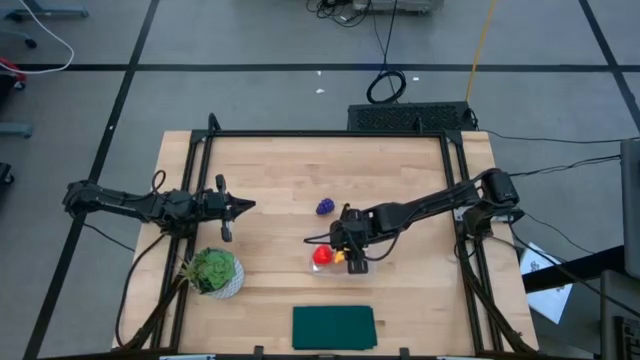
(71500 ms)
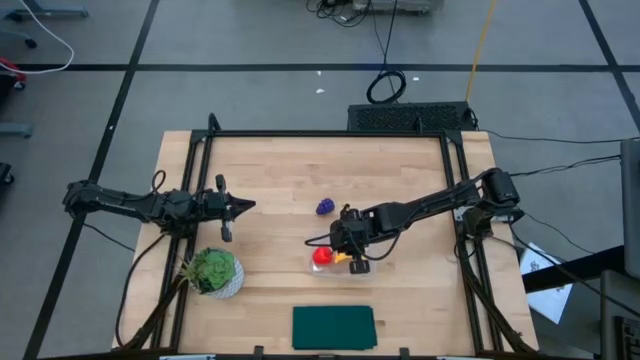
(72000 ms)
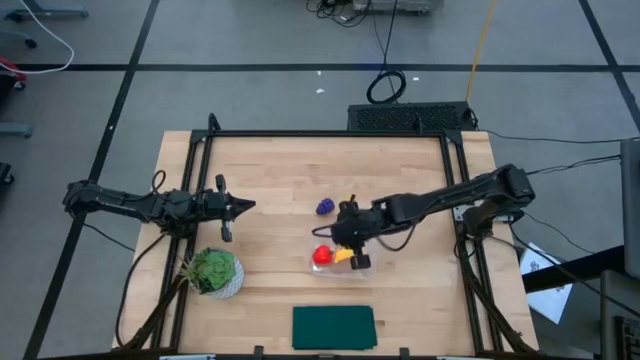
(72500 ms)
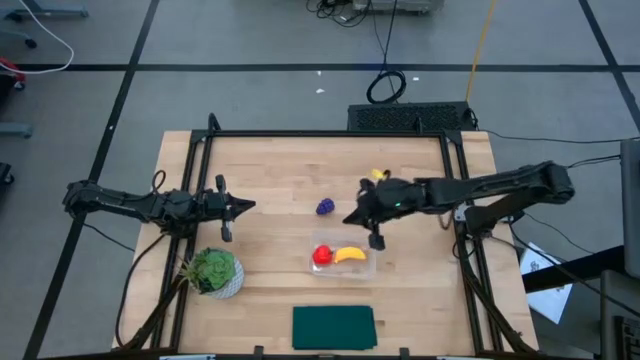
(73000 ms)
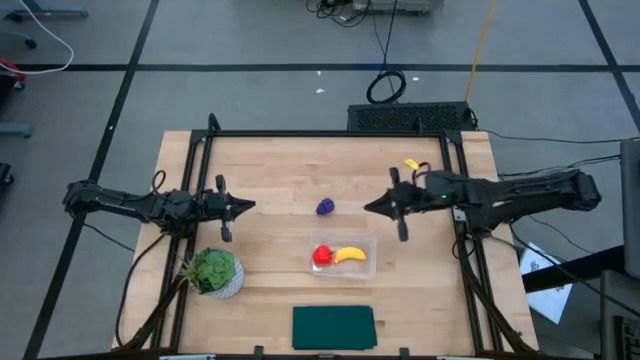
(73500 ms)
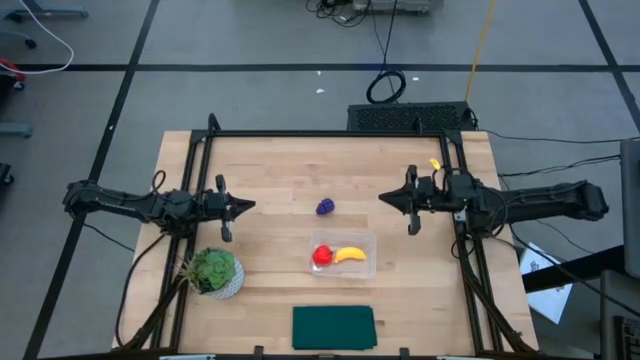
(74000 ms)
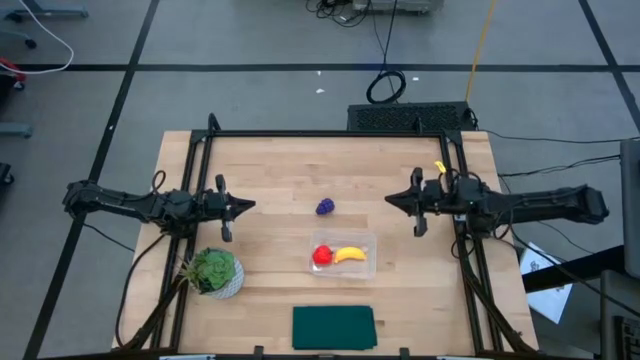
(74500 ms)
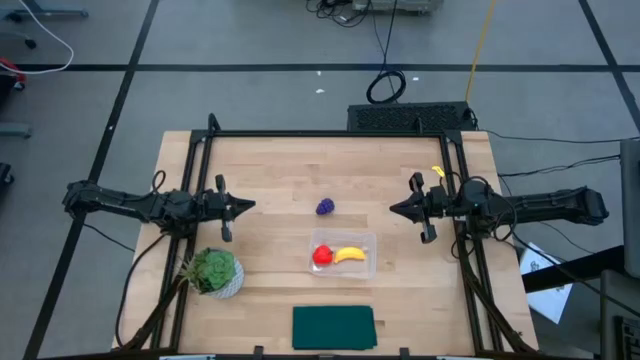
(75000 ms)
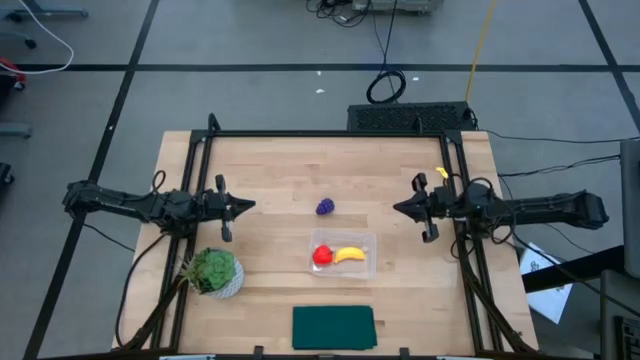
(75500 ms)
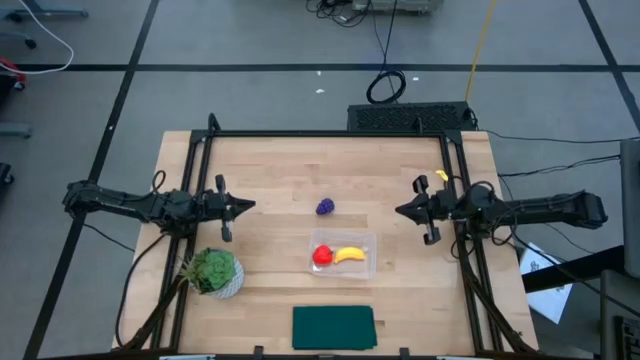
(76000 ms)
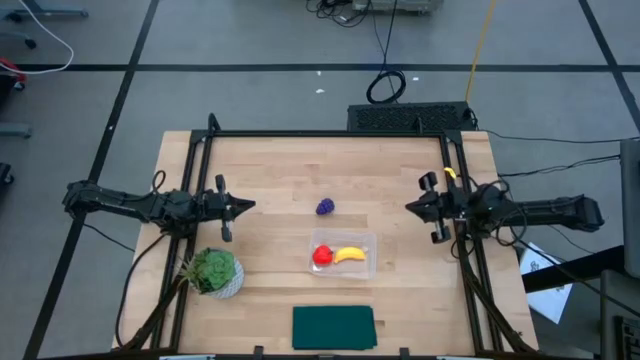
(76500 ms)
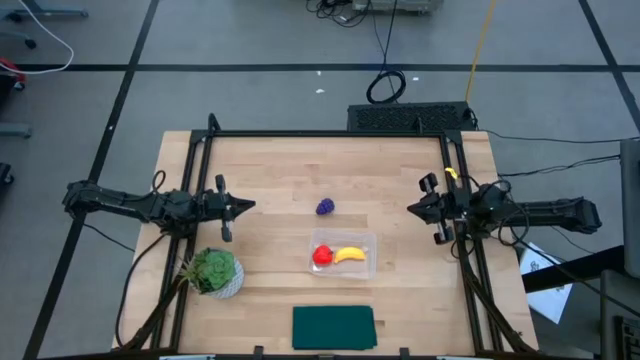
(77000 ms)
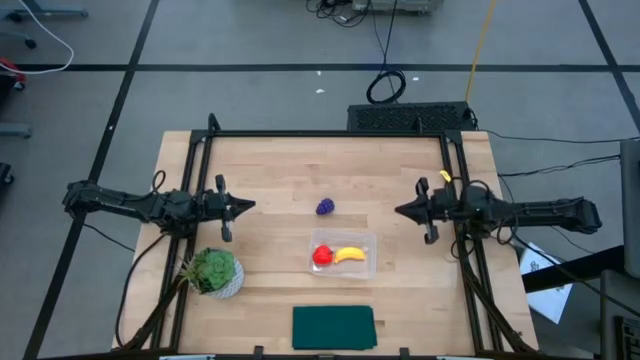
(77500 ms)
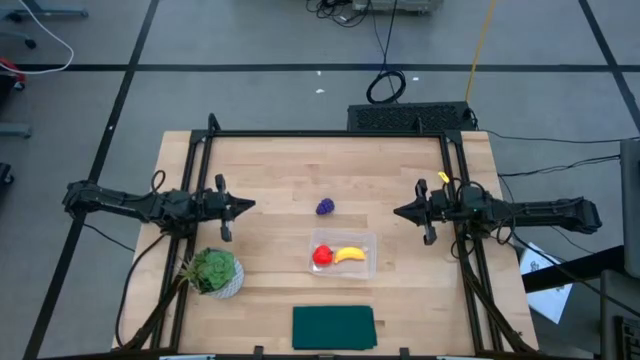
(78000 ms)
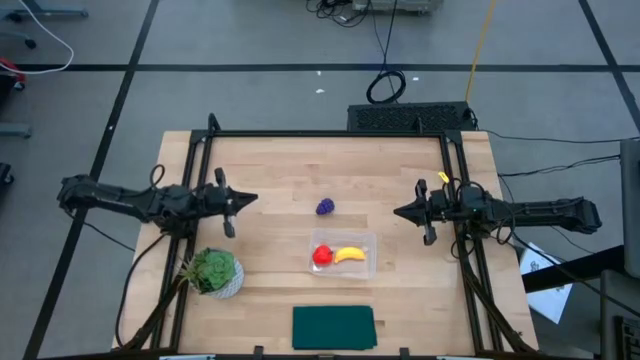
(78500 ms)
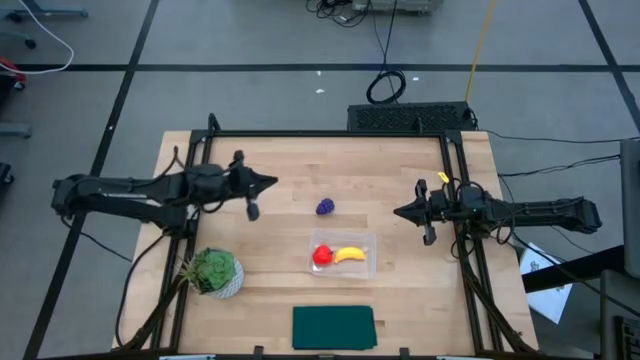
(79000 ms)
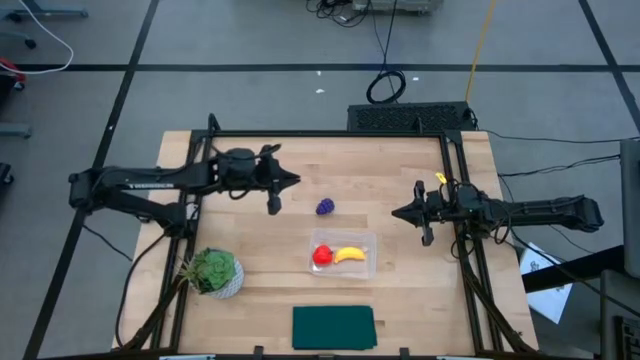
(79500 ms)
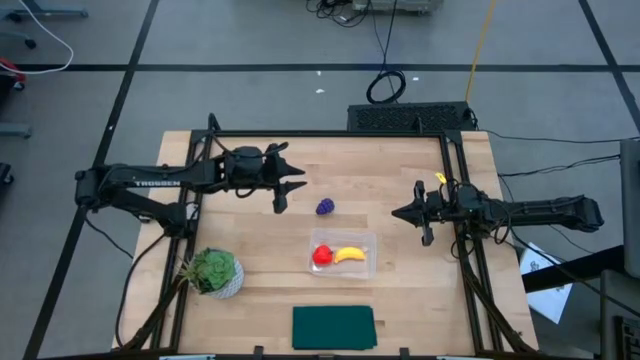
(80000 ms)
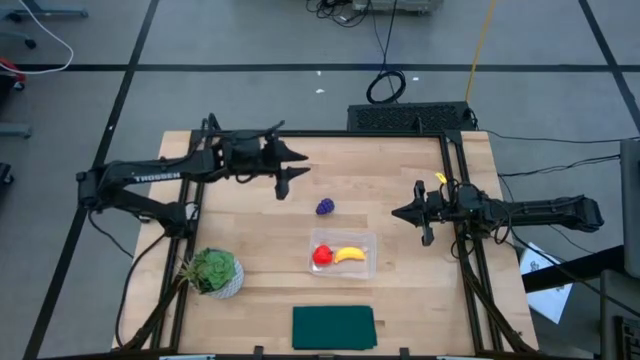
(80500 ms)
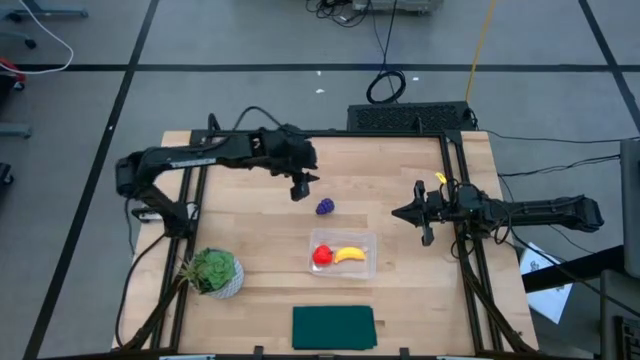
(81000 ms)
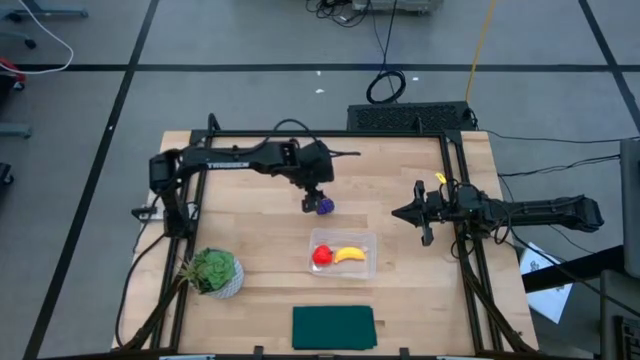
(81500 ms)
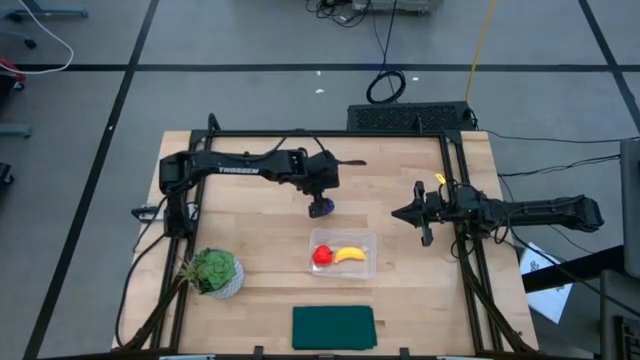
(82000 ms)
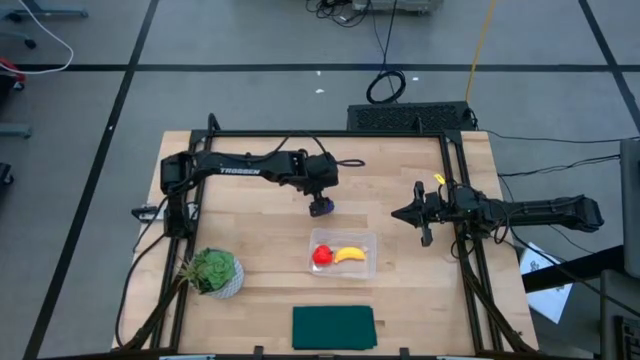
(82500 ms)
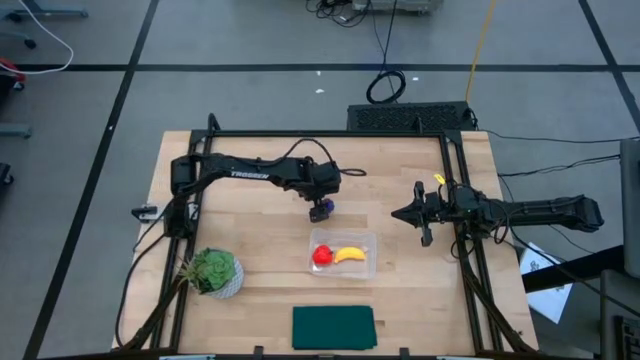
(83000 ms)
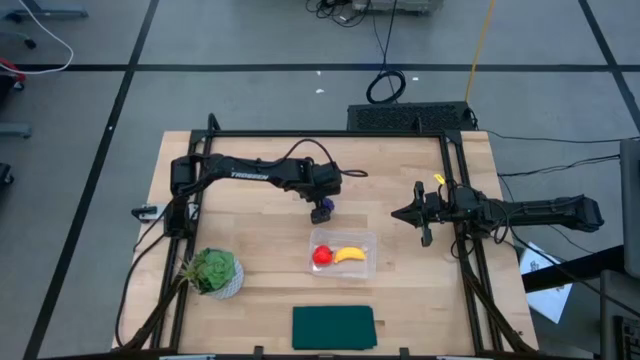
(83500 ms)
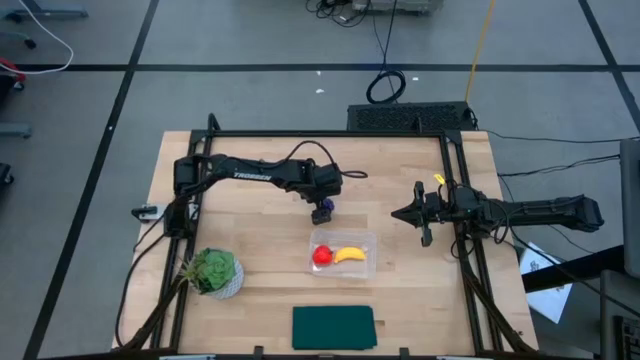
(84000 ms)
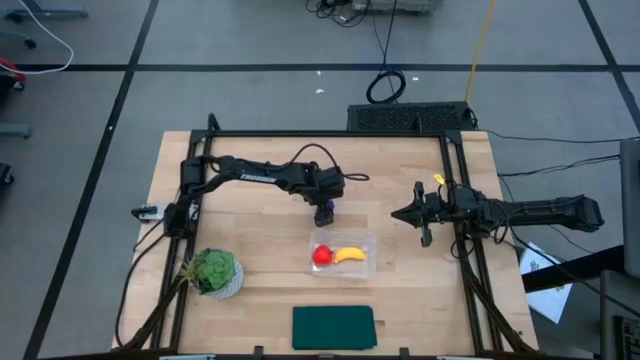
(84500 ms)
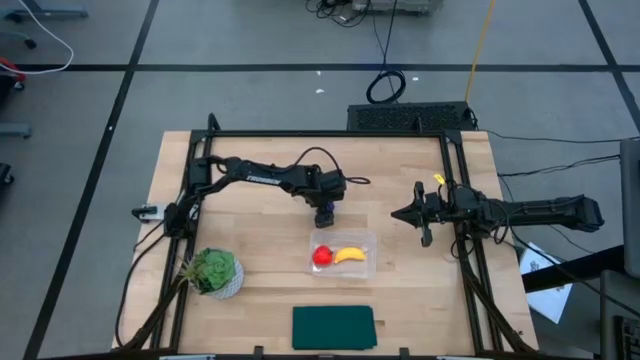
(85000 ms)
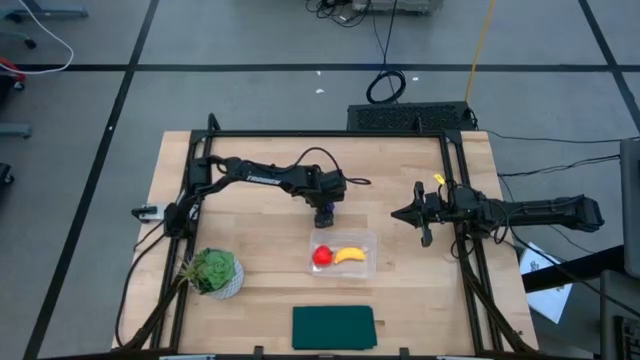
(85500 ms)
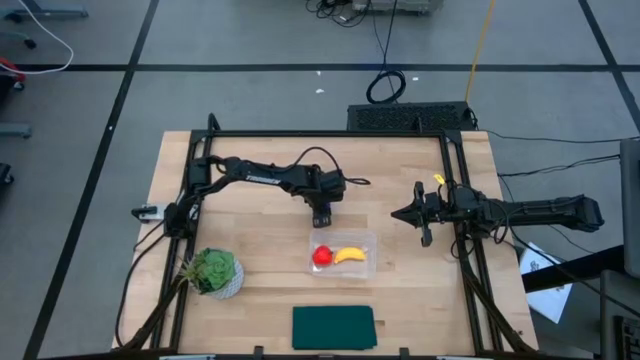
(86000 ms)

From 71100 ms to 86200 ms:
Task: Pick and placing Produce into tupperware
Put the grapes into the transparent bin

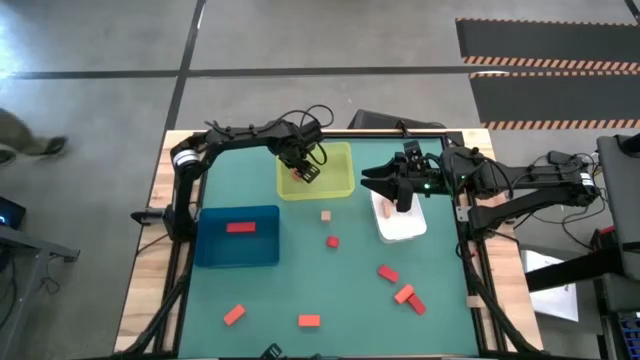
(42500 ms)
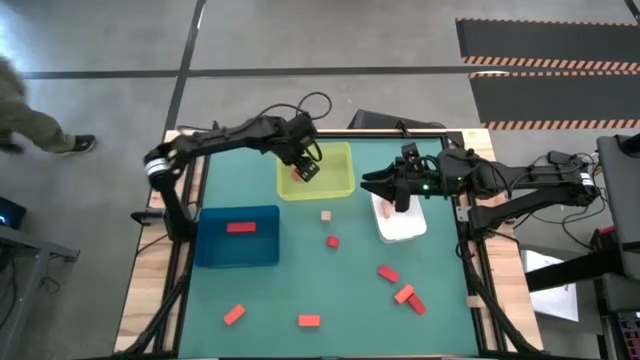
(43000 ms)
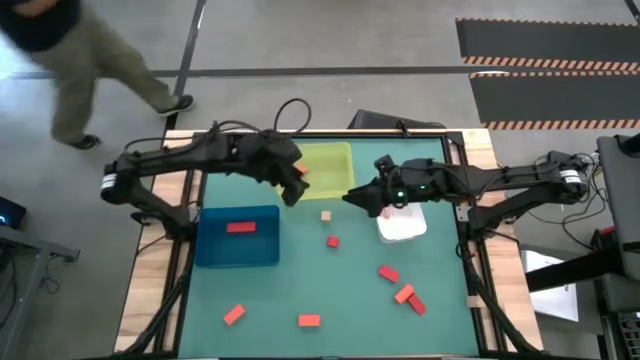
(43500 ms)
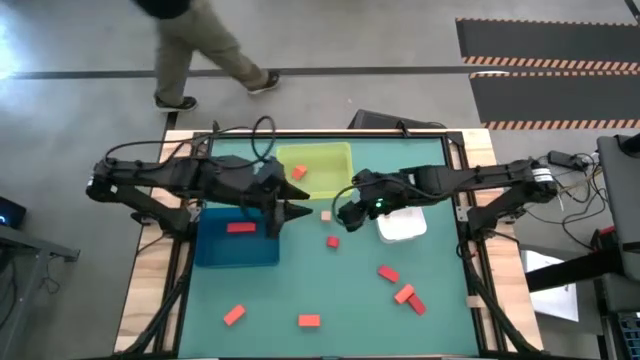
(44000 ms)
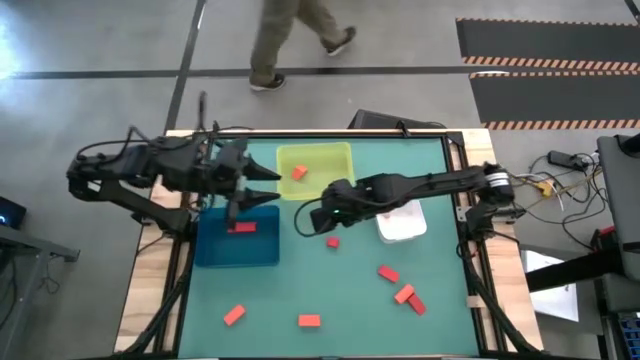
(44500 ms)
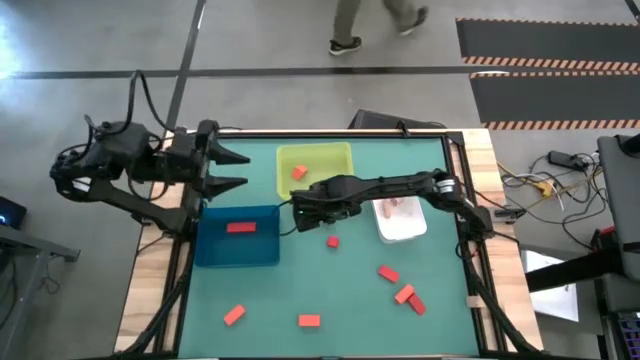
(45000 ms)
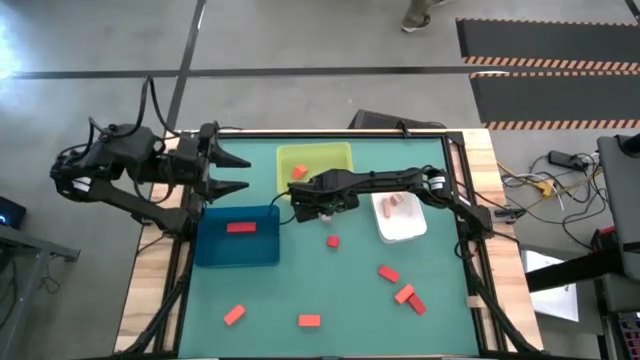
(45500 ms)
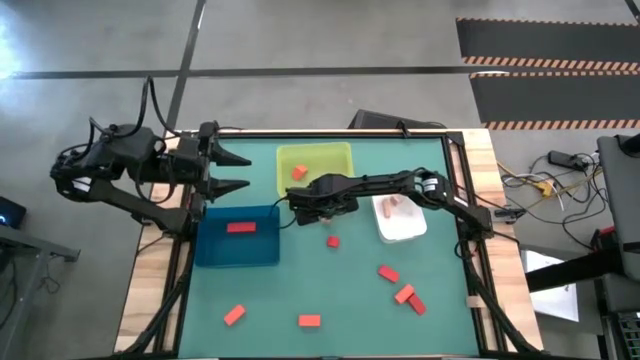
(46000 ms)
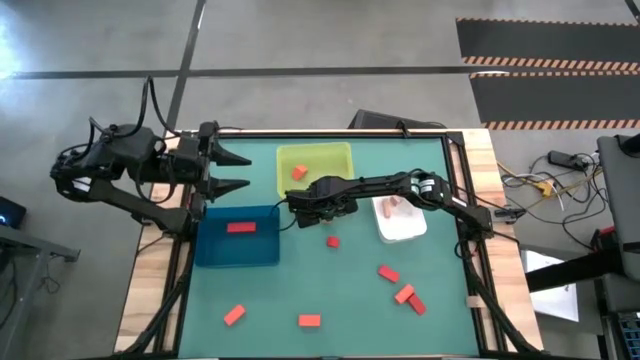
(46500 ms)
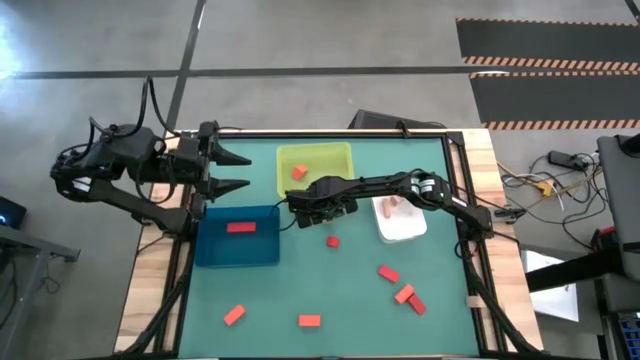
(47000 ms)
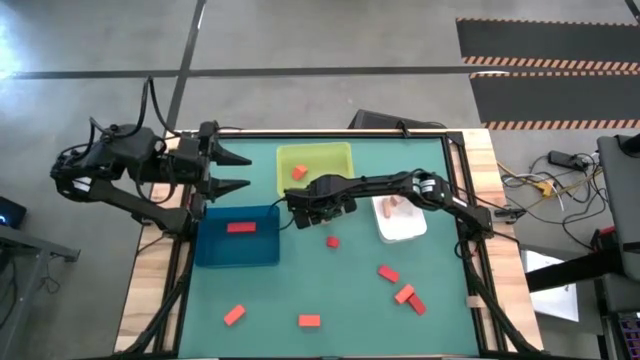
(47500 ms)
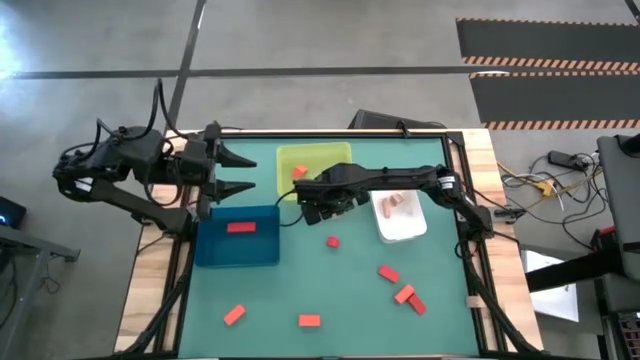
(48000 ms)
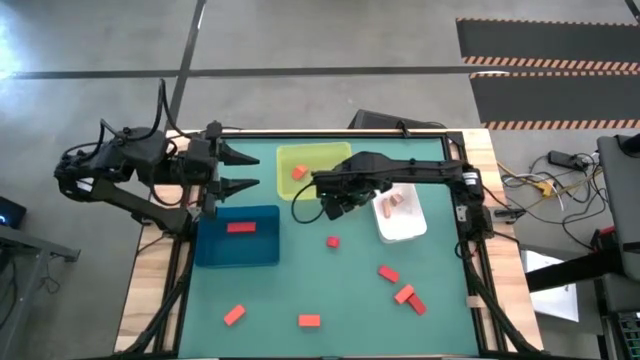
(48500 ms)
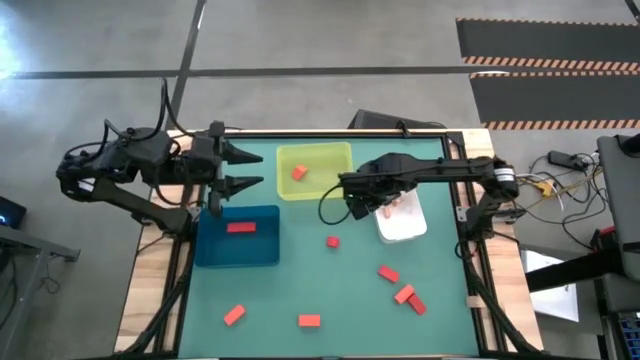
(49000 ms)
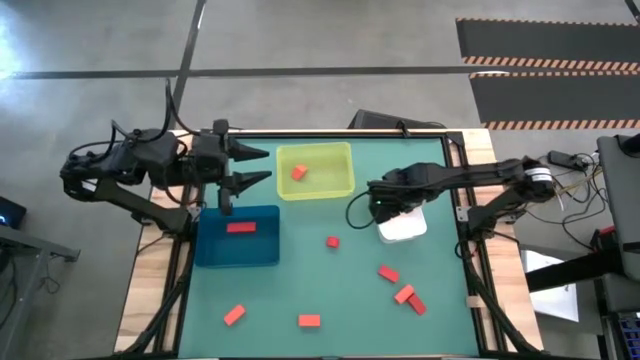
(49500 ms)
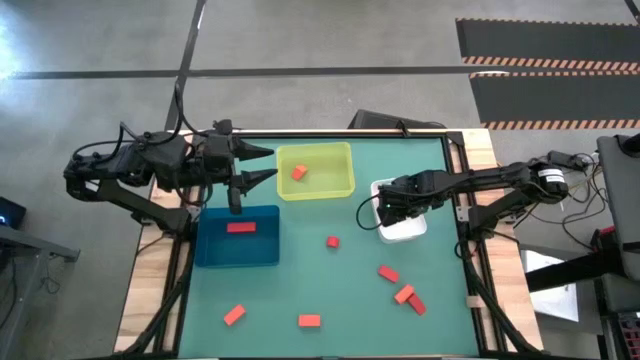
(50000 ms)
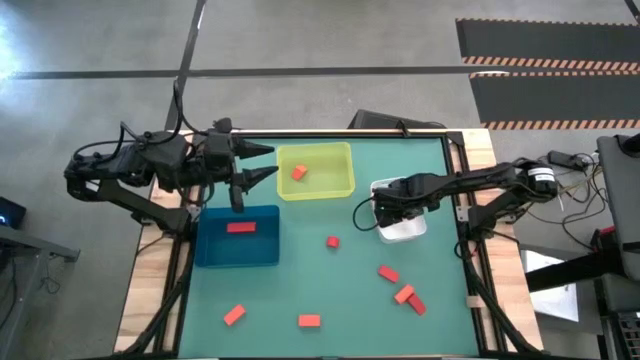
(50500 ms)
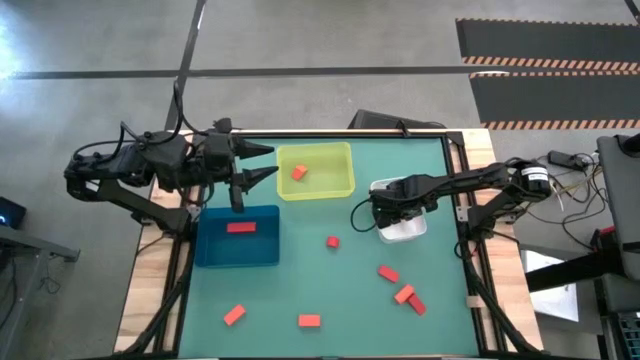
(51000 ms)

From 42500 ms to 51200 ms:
Task: Sort & place blocks by color
Put the brown block into the white bin
